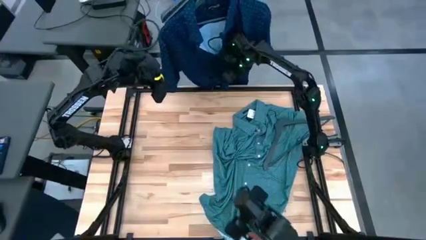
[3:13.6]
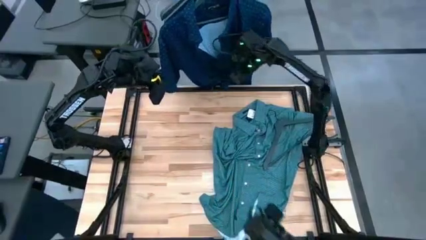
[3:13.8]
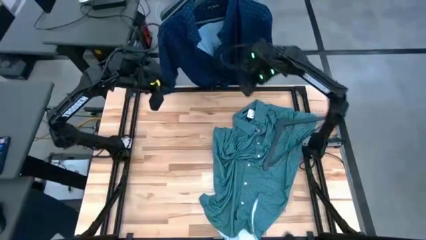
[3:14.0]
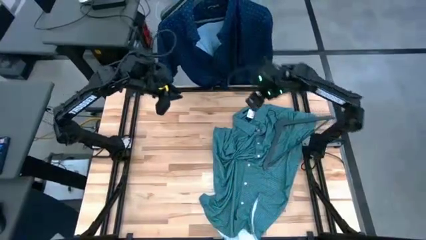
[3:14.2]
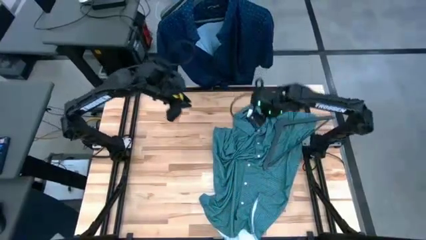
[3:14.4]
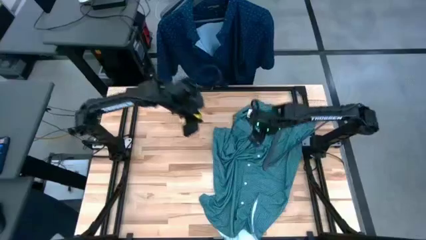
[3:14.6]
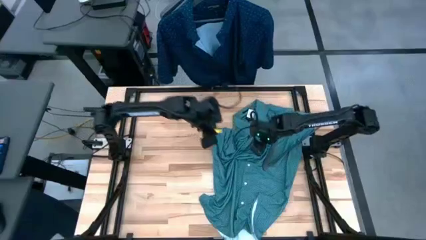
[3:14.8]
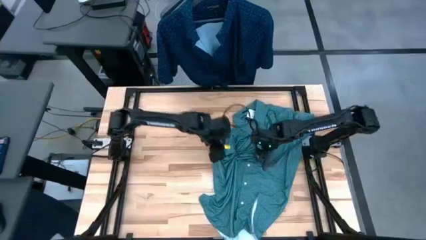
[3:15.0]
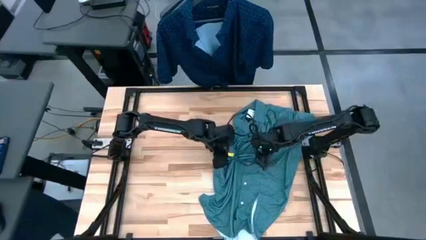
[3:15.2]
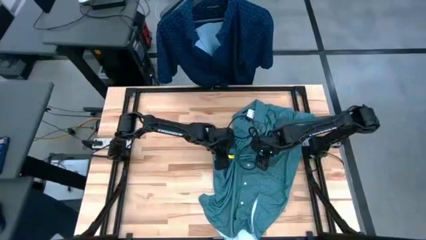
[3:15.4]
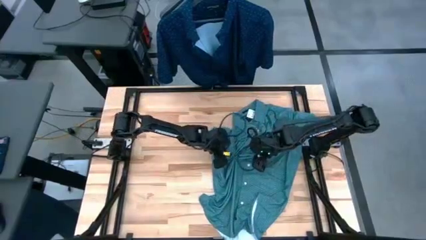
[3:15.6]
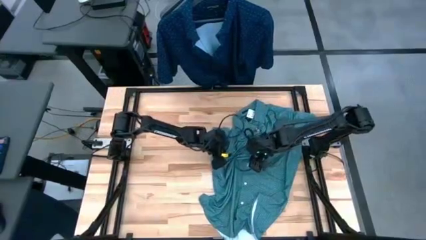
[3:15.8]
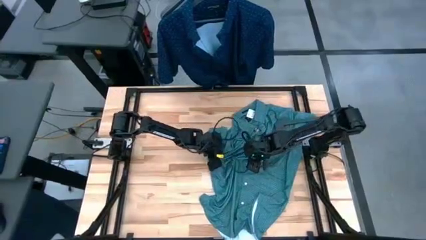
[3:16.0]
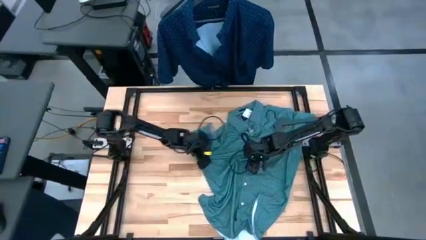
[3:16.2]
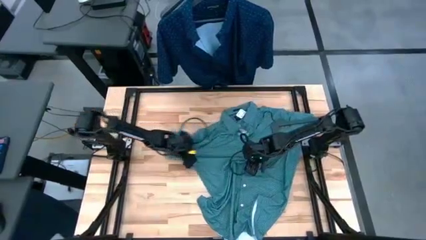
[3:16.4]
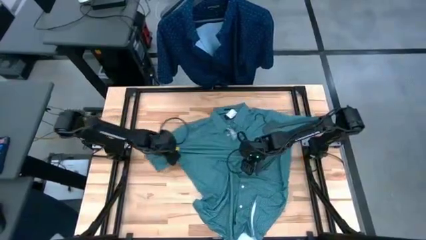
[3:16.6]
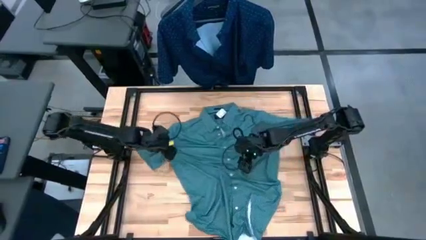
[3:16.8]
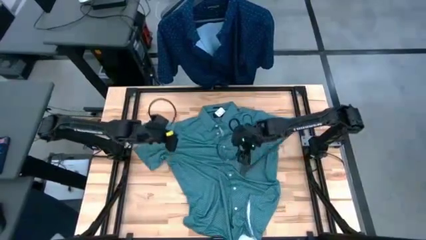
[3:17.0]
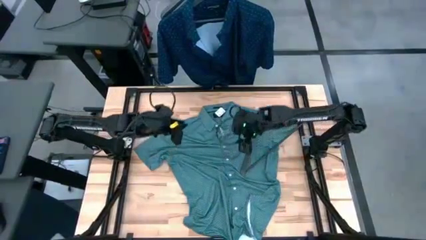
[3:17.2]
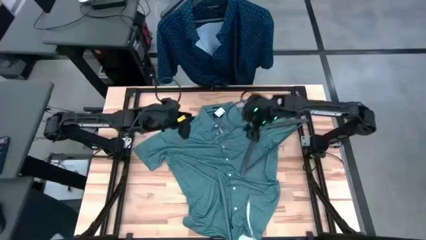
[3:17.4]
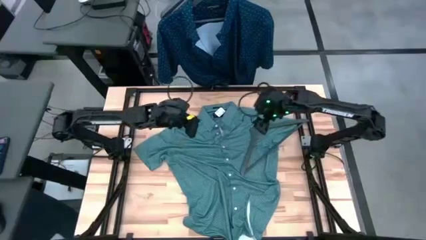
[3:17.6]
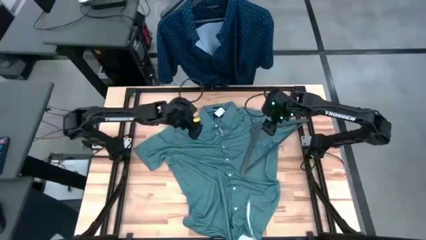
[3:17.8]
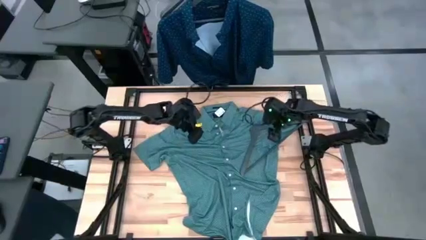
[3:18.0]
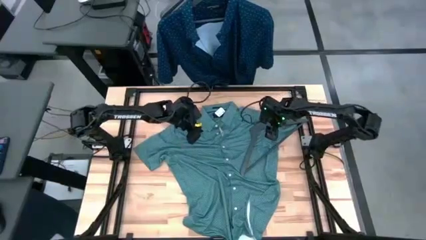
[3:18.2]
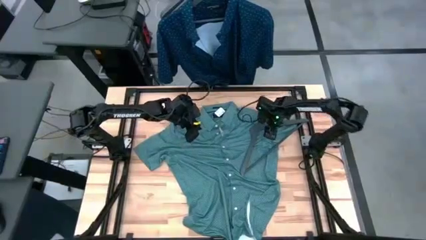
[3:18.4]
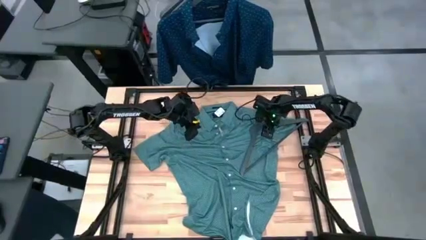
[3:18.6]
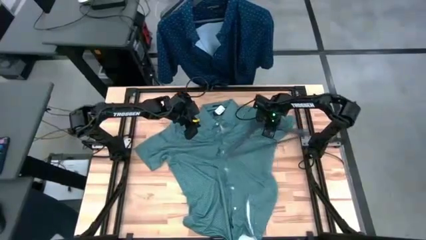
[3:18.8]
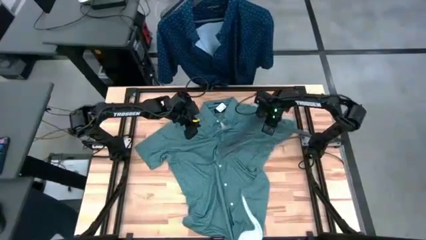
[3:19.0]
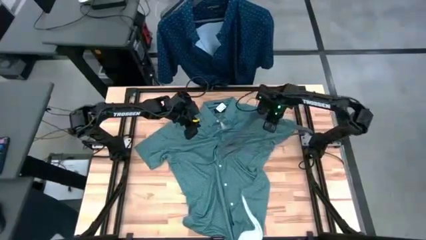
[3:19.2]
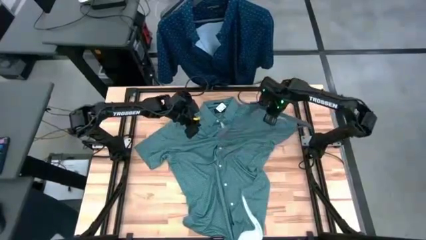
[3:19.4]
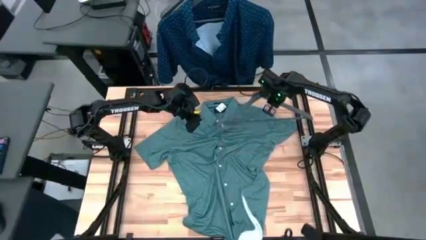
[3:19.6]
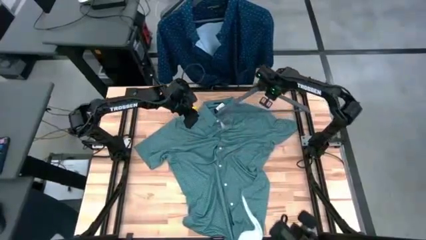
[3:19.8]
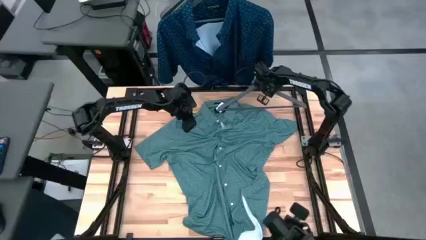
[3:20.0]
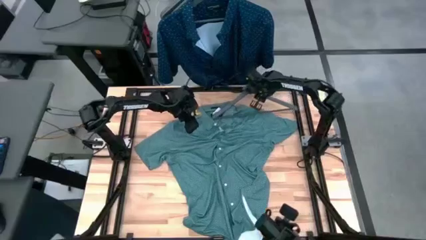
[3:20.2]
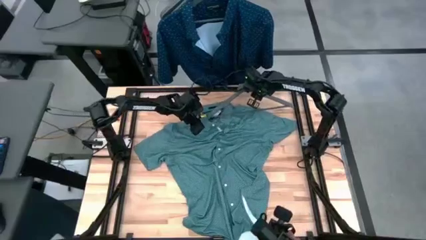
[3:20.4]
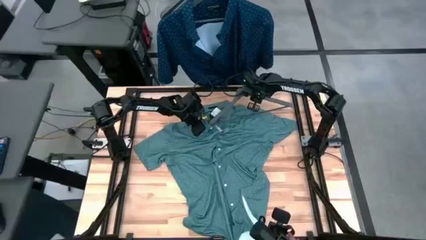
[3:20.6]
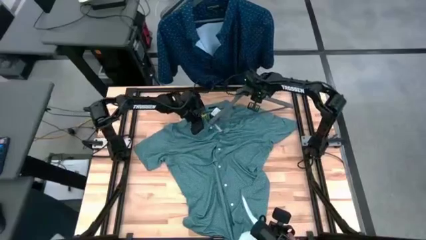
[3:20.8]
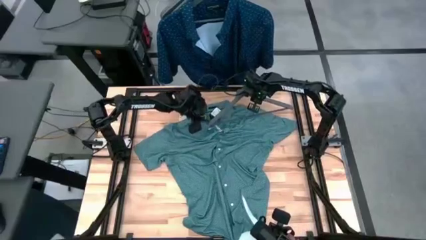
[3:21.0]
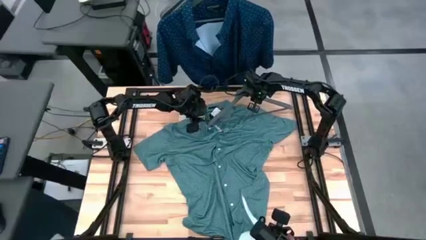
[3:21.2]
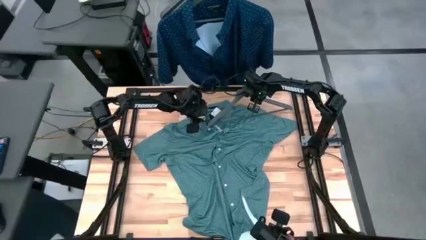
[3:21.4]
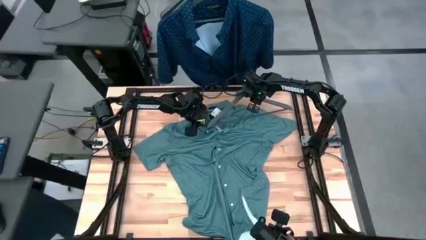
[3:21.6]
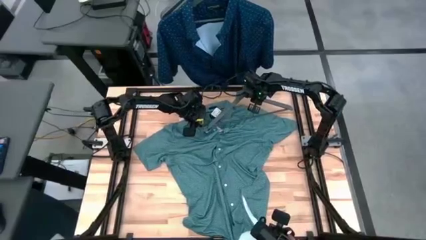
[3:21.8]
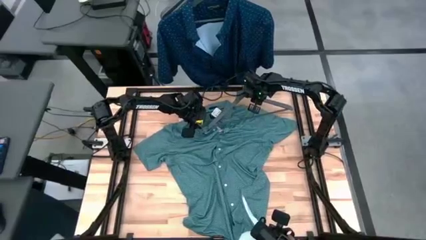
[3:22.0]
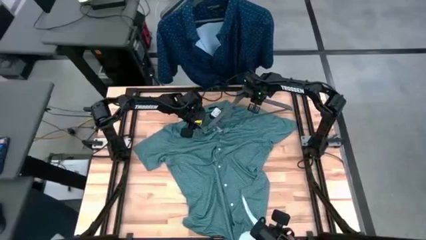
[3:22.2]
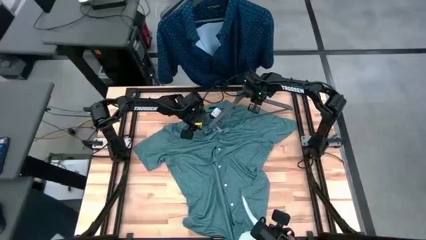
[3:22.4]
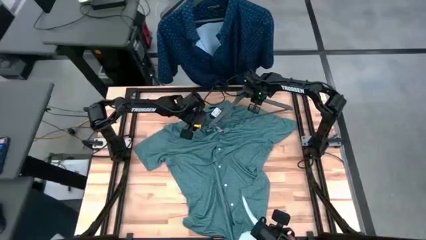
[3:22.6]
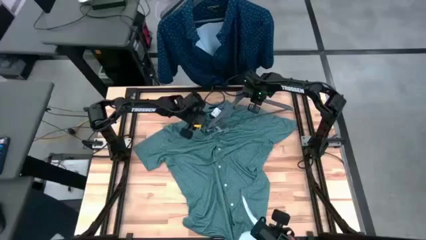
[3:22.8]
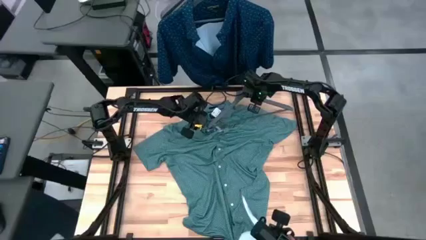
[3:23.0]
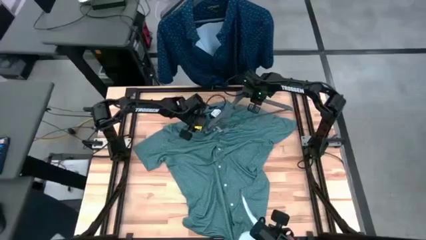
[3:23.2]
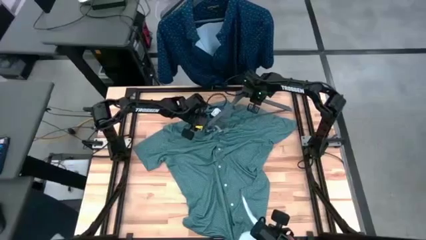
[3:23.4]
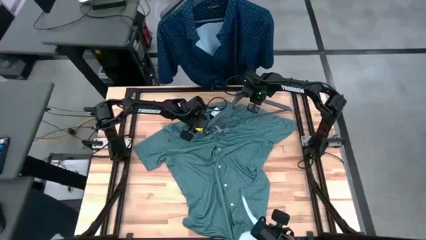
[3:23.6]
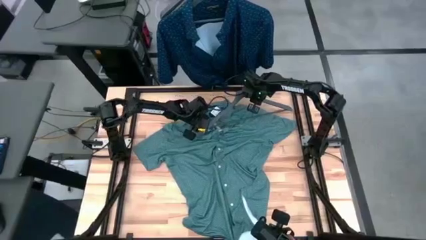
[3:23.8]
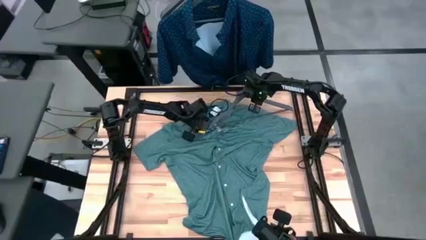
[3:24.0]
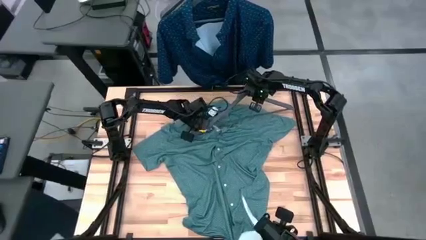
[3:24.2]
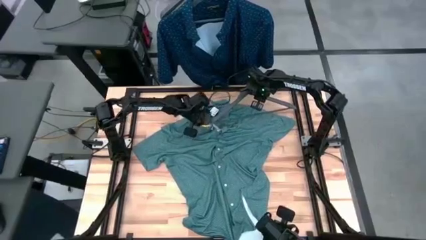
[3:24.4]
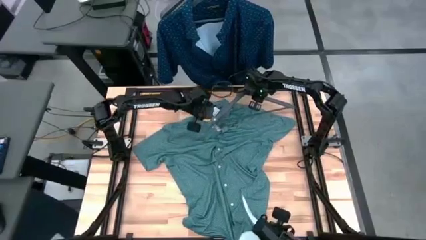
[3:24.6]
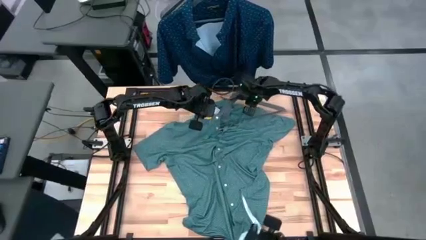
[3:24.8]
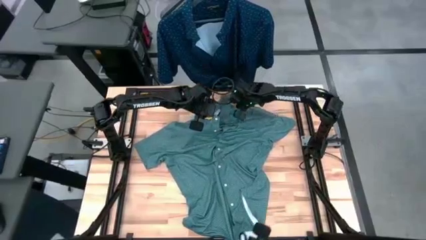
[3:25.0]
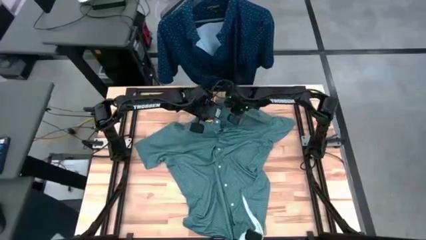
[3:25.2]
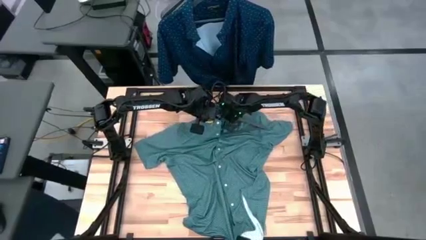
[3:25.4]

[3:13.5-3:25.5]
Task: Hang clothes
Hang the green polo shirt on the rack

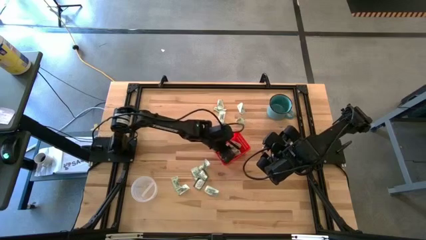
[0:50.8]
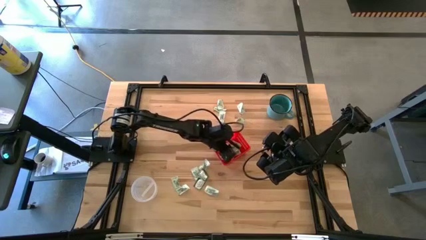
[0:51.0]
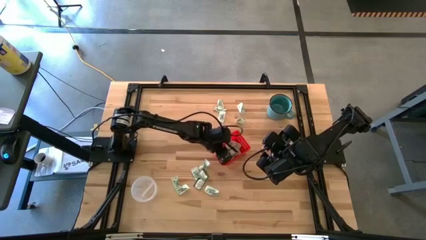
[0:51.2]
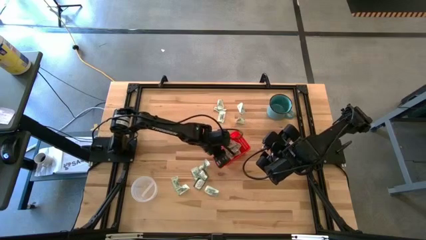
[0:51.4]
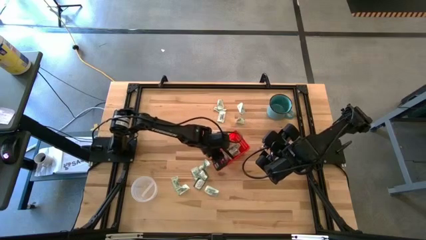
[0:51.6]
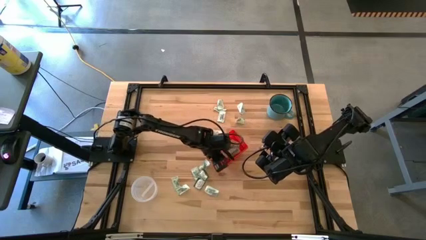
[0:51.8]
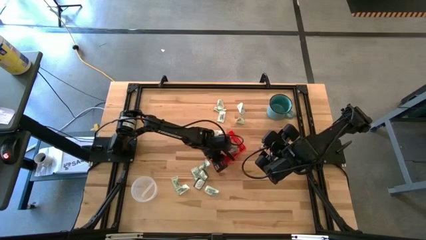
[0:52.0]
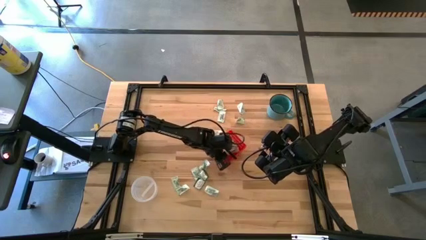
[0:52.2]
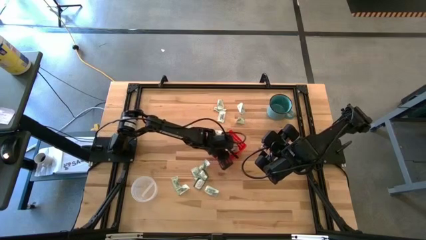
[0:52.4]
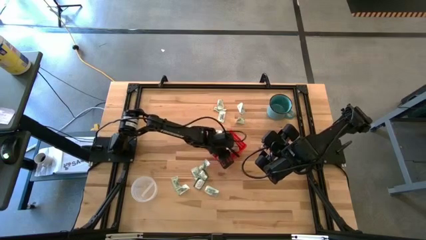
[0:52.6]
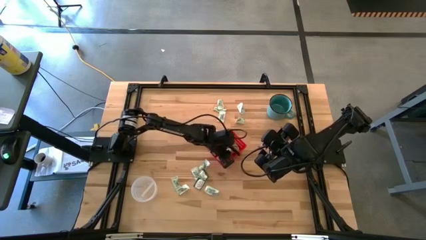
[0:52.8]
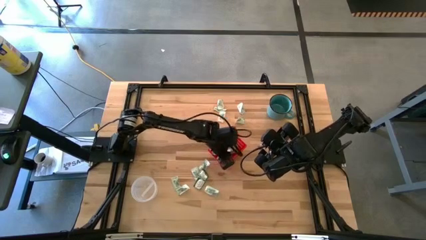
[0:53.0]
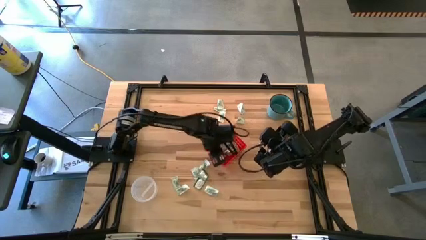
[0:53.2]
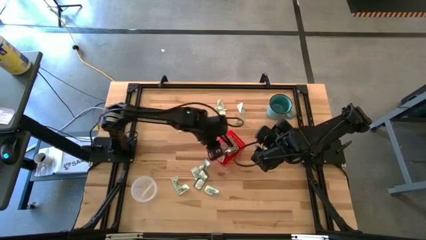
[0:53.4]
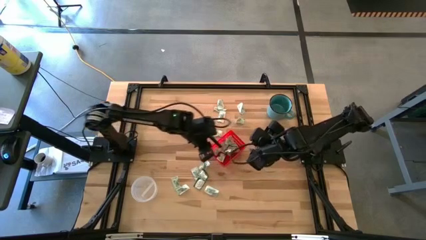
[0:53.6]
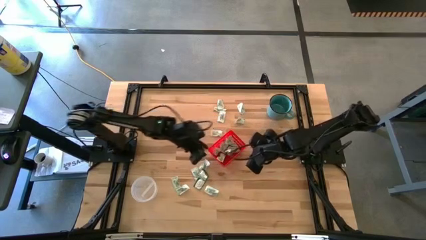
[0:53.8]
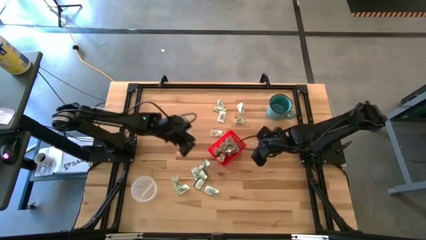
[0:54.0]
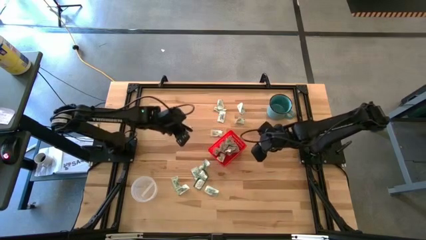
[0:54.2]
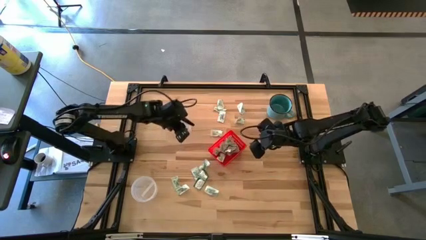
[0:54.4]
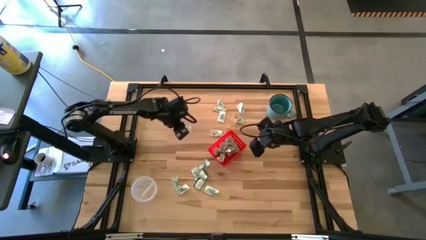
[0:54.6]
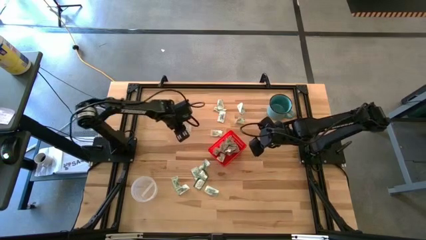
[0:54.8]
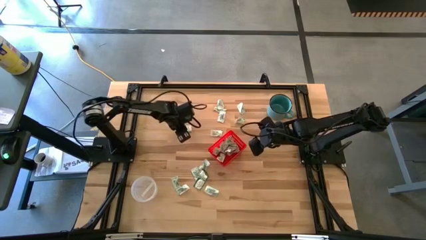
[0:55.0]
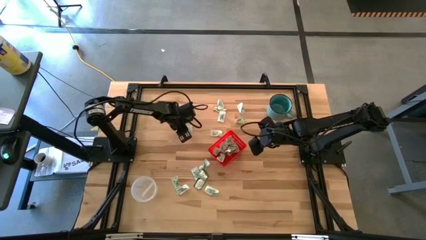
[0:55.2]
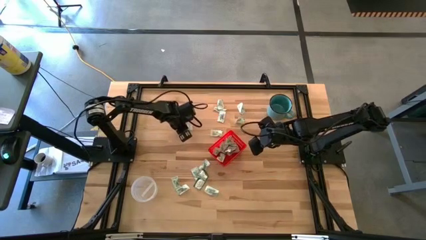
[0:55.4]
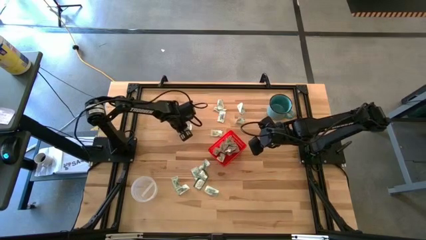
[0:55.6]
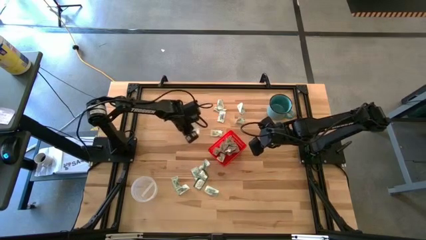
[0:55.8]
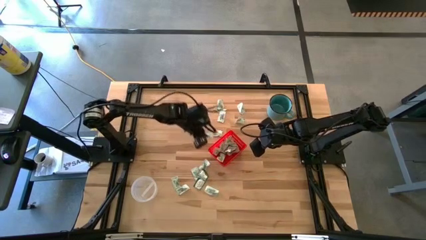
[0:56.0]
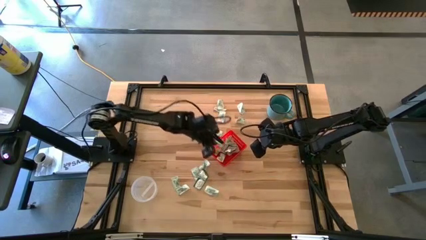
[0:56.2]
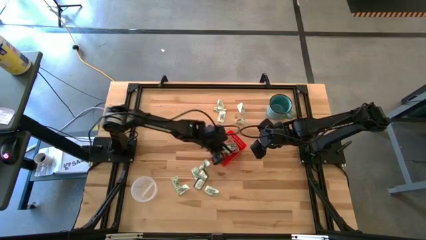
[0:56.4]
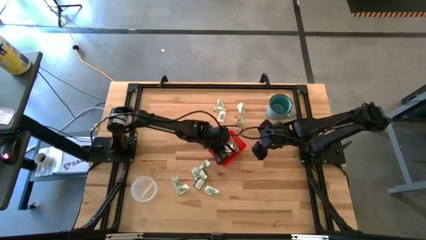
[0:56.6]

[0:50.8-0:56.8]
Task: Pick and place items into bin
Put the white stevia pack into the red bin
